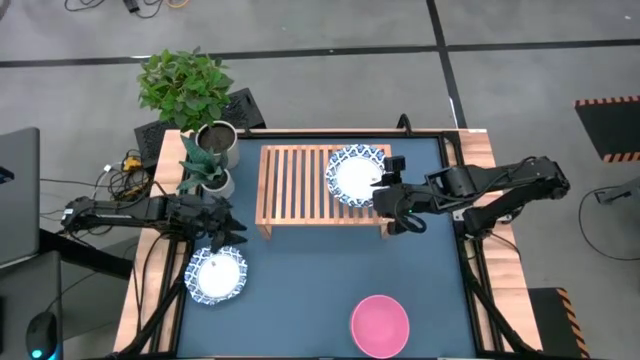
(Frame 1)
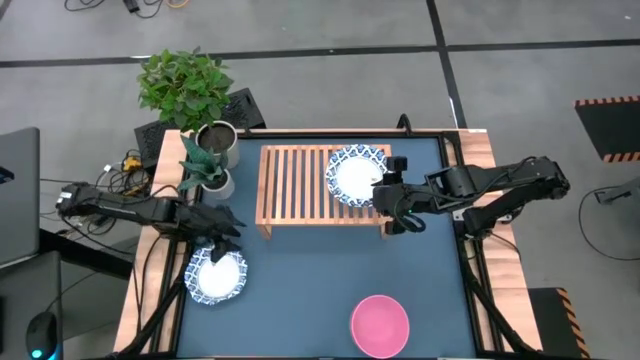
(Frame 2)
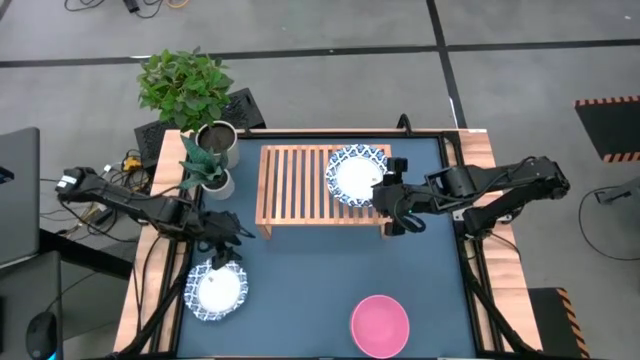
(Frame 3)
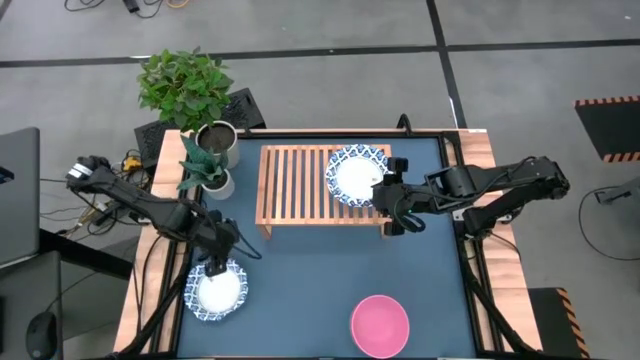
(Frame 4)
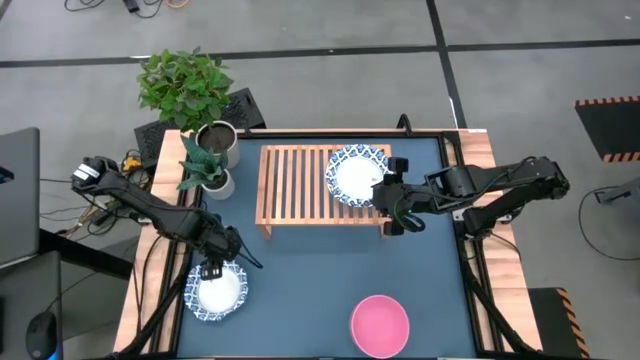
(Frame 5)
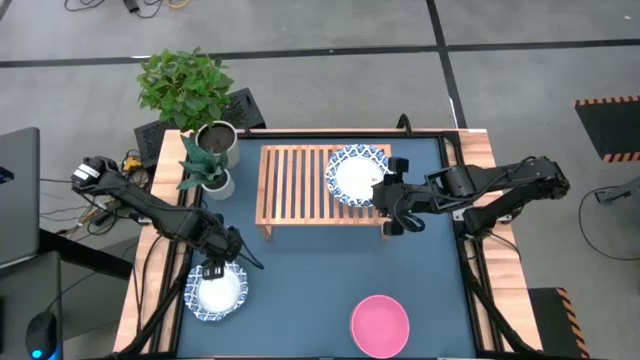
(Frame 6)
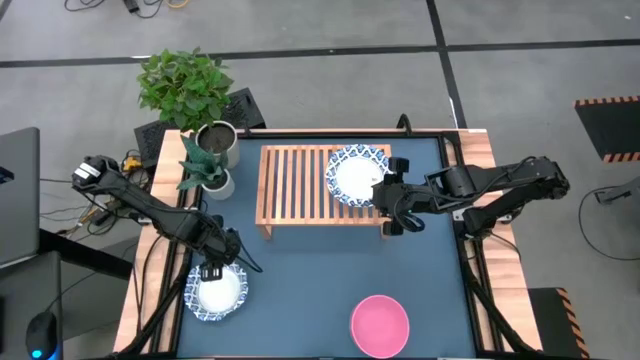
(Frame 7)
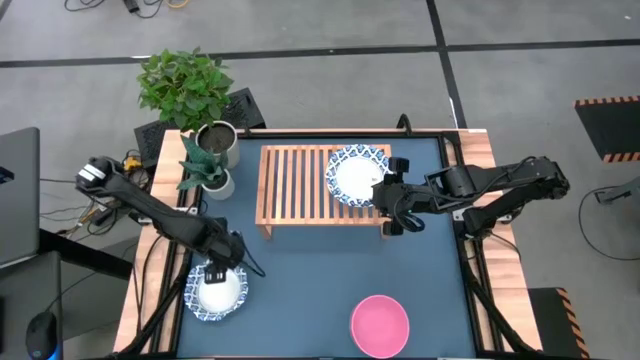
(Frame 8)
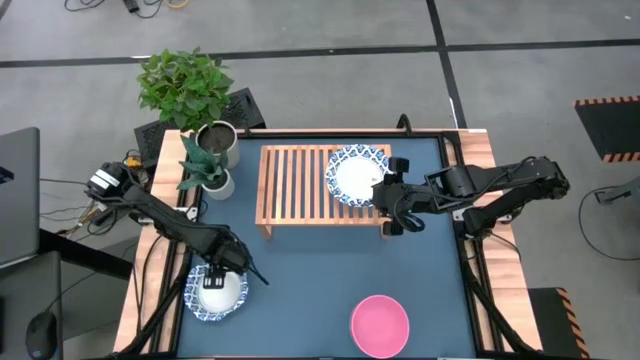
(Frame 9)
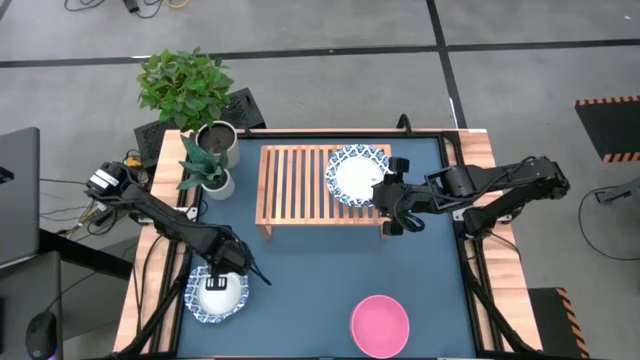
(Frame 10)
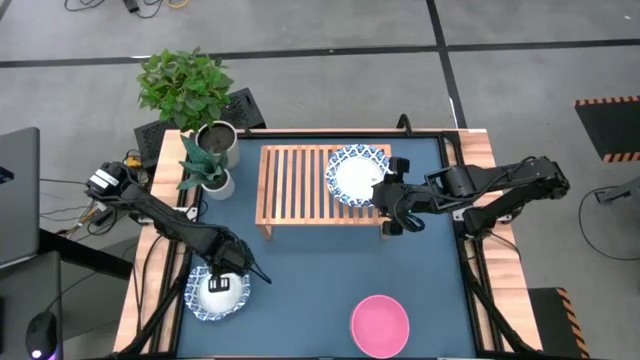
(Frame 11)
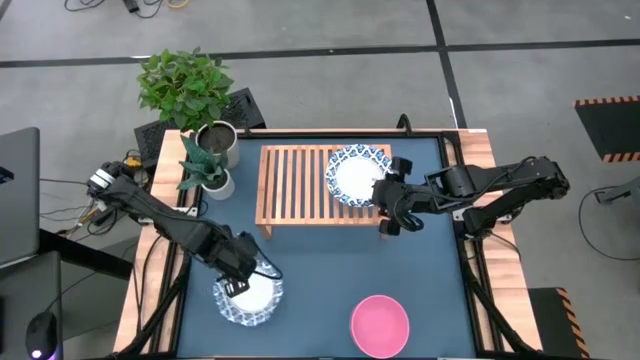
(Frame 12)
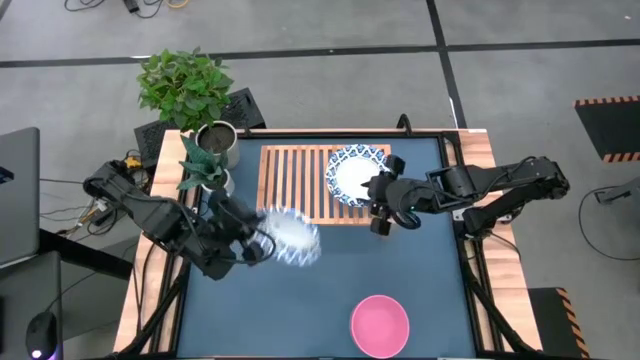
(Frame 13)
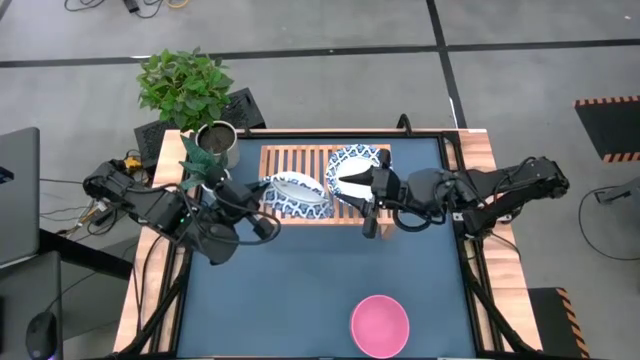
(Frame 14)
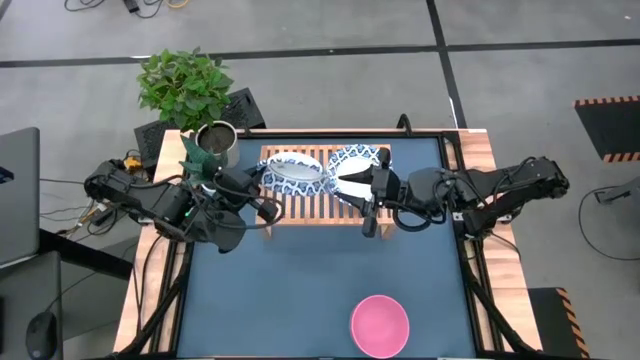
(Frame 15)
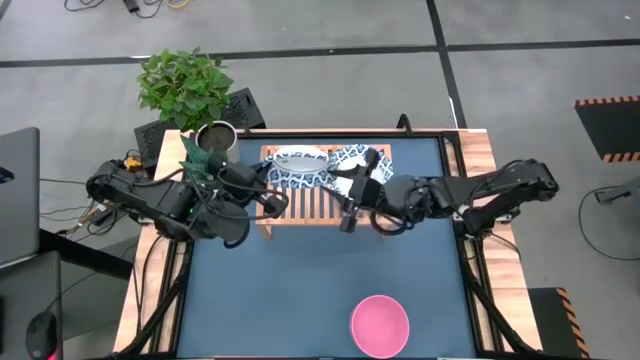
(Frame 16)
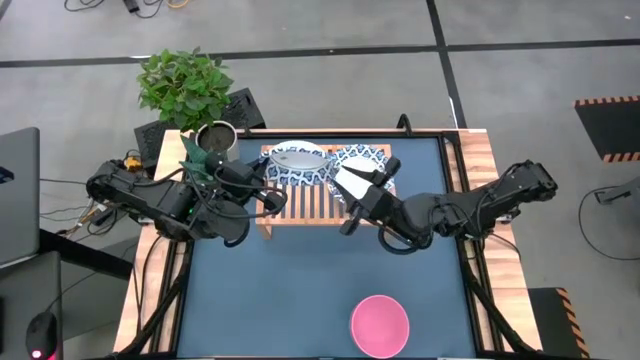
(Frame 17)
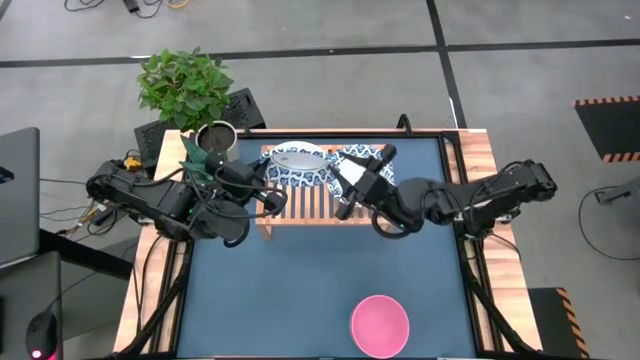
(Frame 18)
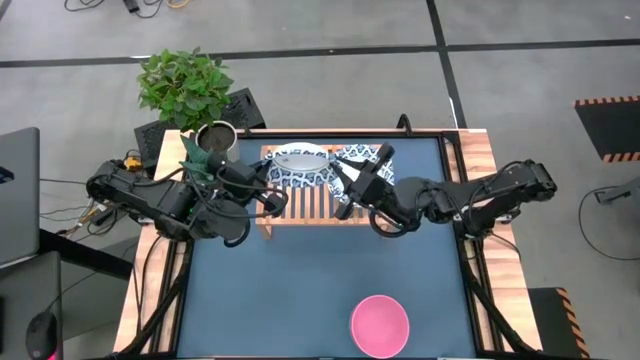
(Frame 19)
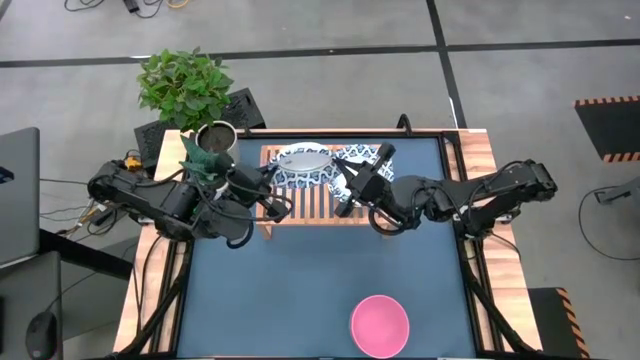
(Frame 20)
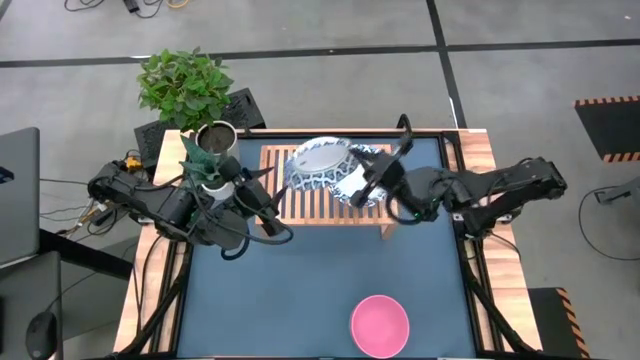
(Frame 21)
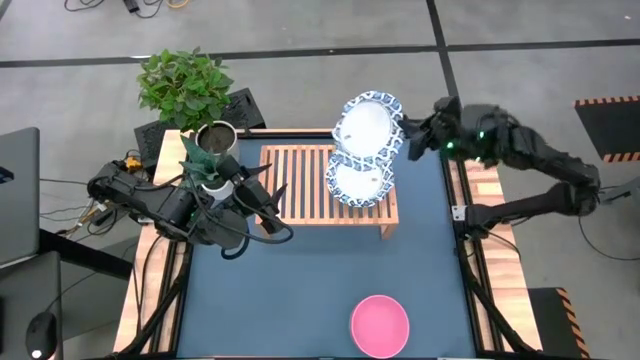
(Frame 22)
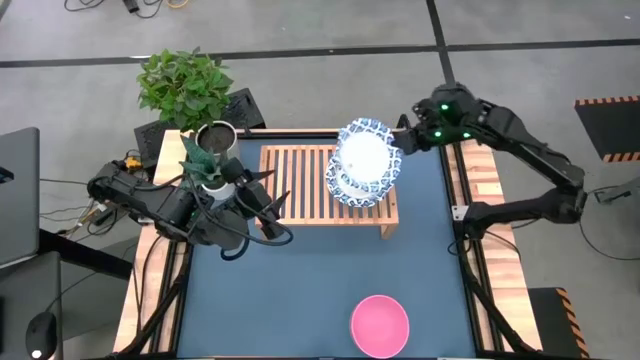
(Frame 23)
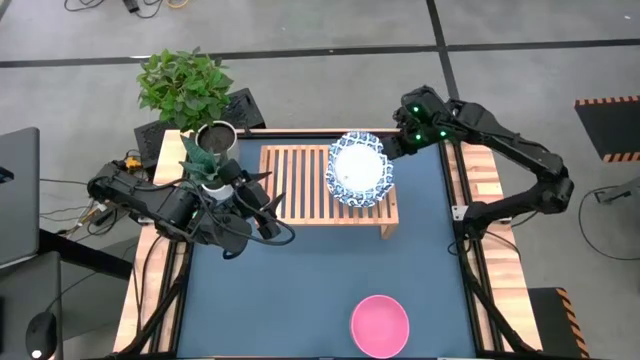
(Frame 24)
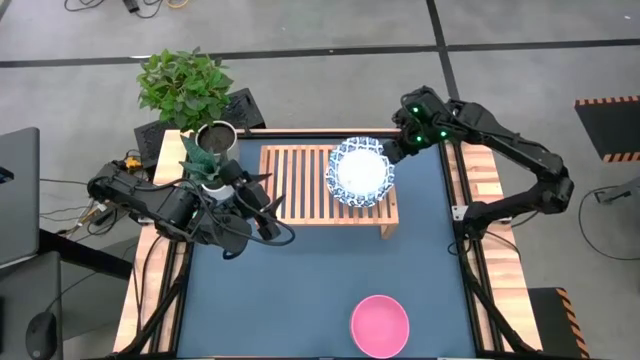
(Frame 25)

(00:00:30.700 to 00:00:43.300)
Task: Place and stack bowls onto a shelf
Stack the white patterned bowl on top of the white patterned bowls on the shelf

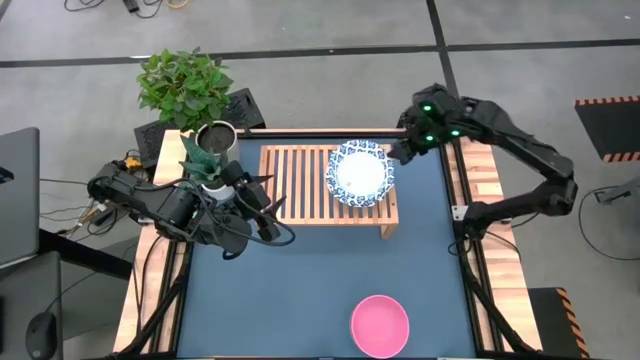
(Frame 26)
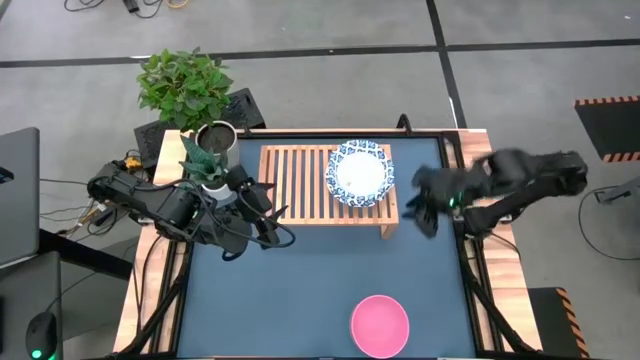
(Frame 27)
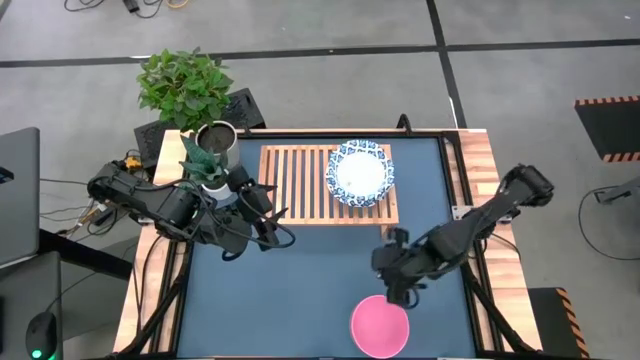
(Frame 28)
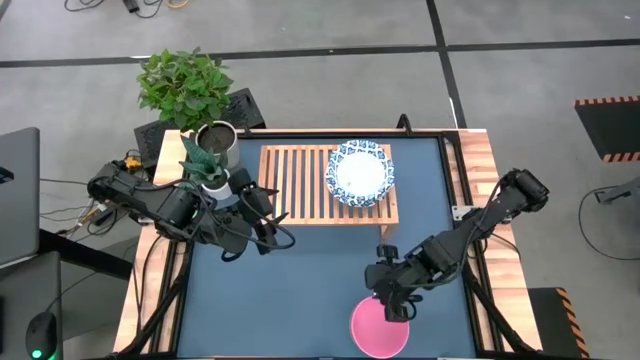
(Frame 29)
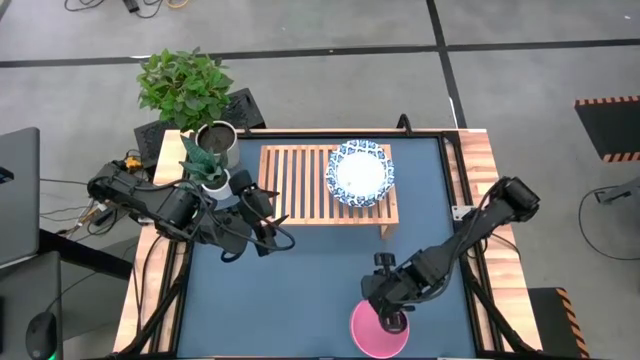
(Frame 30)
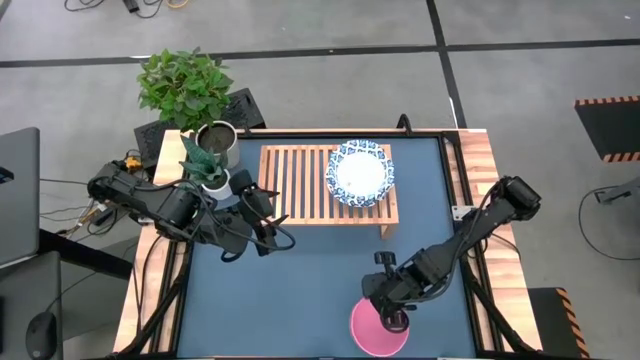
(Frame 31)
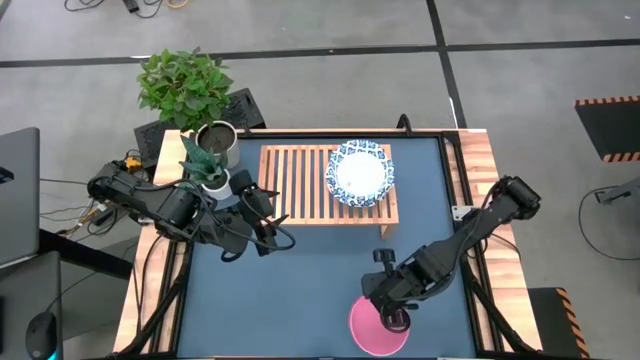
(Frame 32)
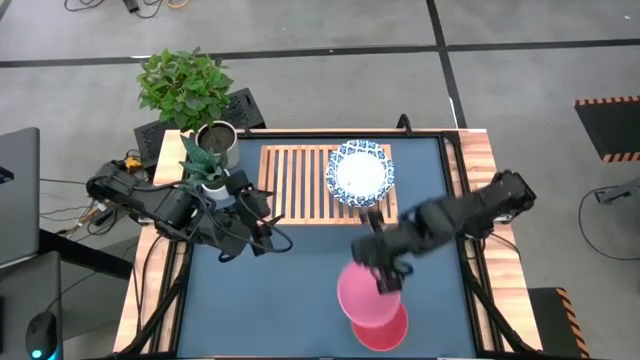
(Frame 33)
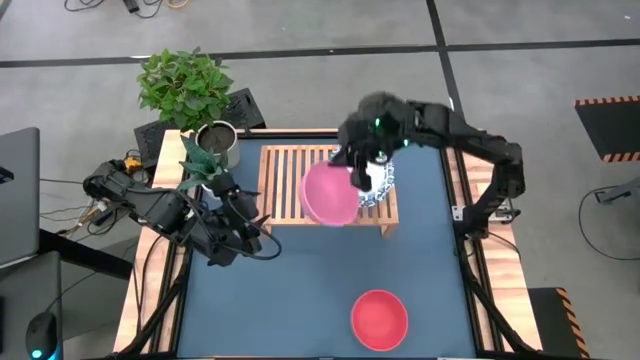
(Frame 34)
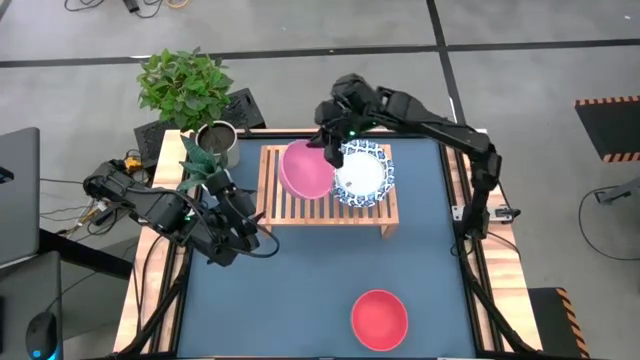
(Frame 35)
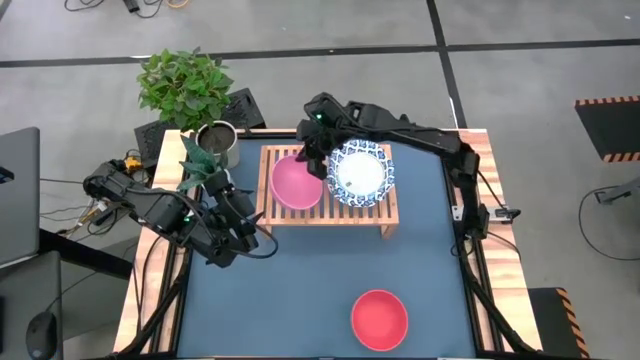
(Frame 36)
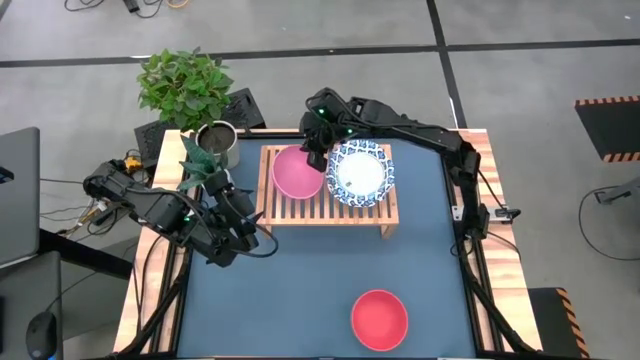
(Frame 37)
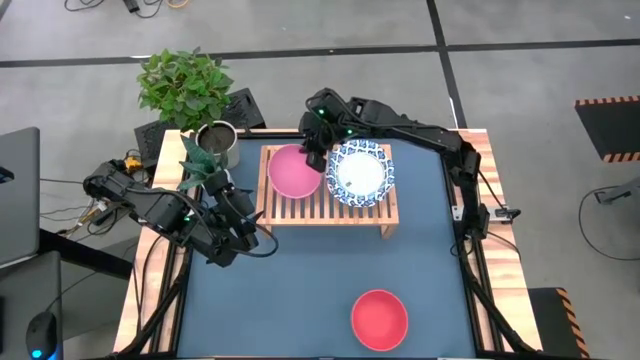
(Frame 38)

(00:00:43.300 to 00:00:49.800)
Put the pink bowl on the shelf

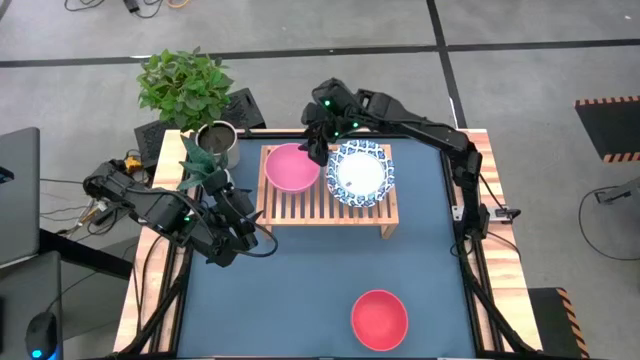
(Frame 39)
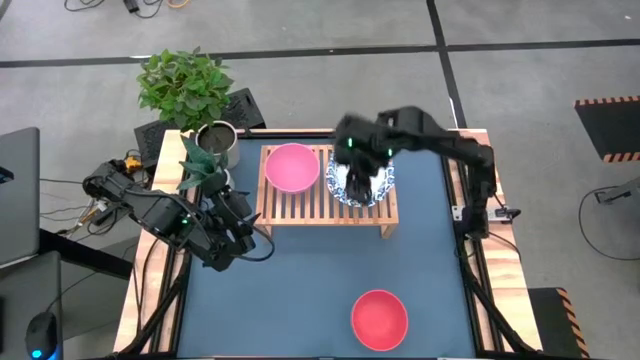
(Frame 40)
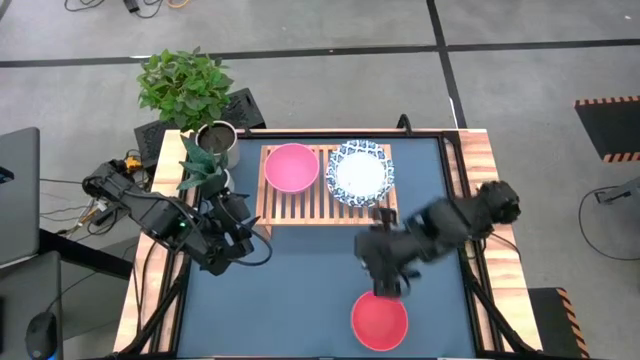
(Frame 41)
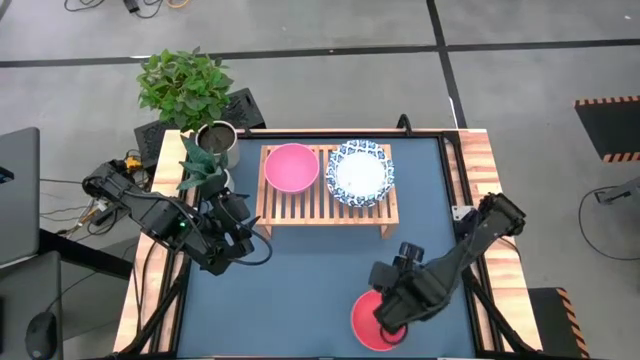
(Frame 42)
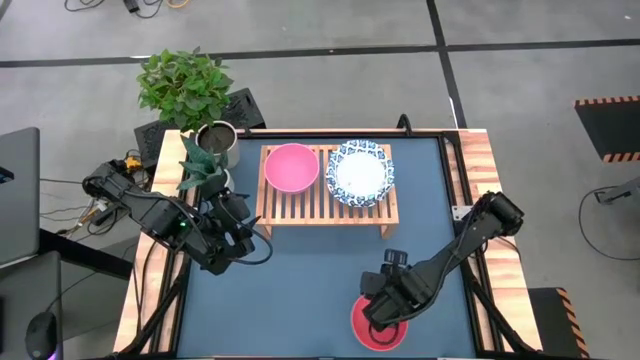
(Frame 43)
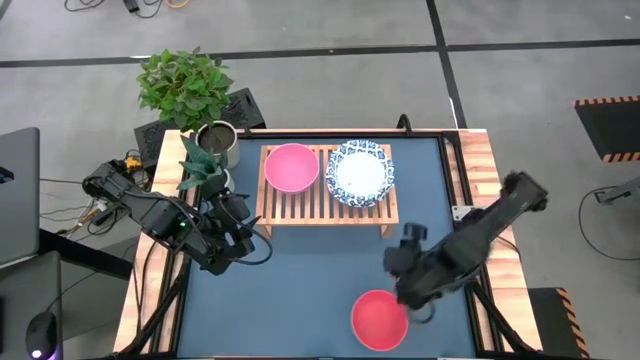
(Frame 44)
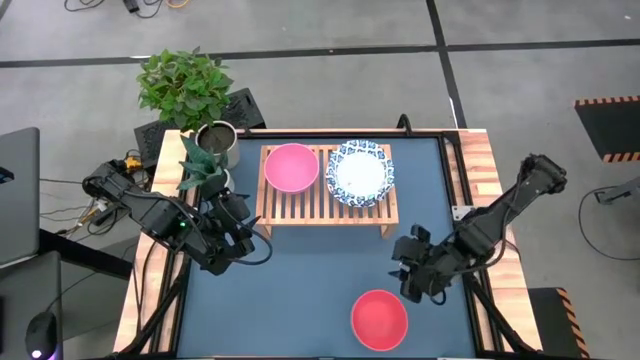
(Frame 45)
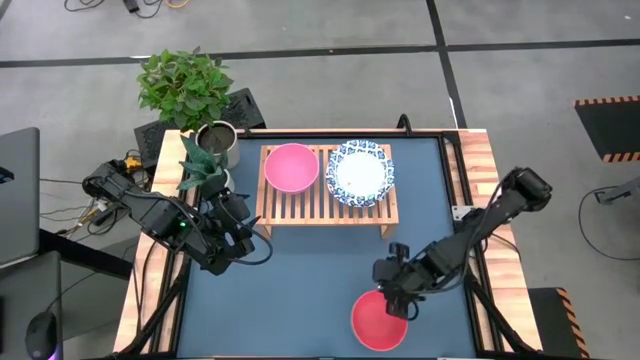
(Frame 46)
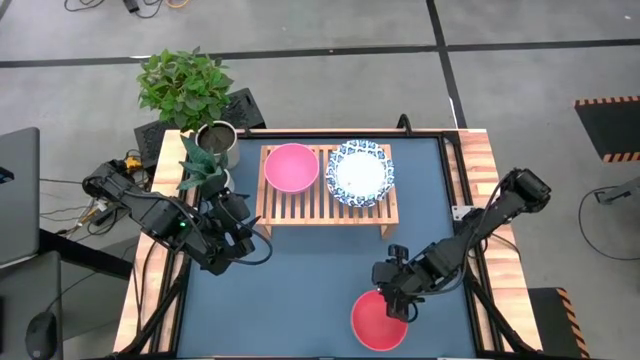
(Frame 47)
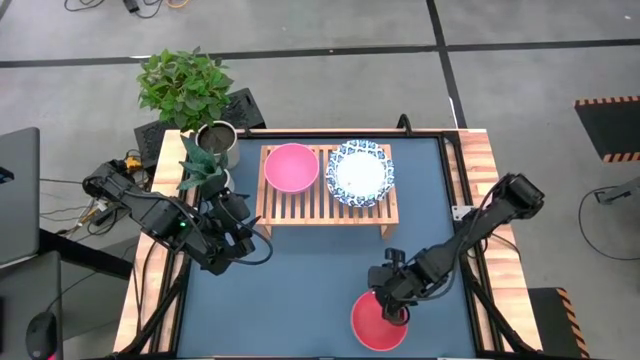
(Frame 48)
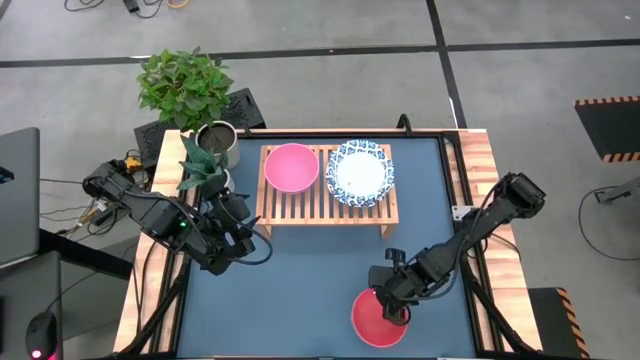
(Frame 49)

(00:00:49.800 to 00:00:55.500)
Stack the red bowl on top of the pink bowl on the shelf
